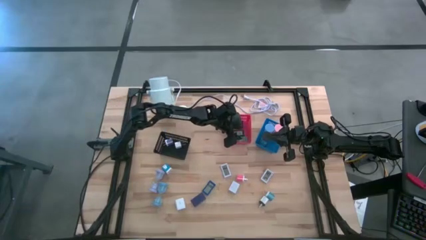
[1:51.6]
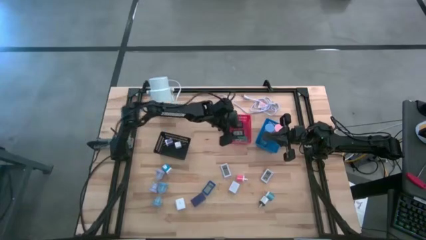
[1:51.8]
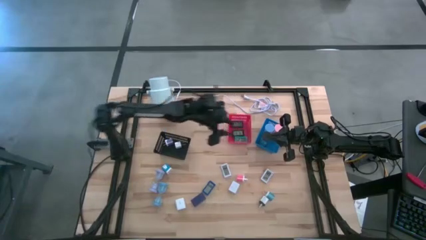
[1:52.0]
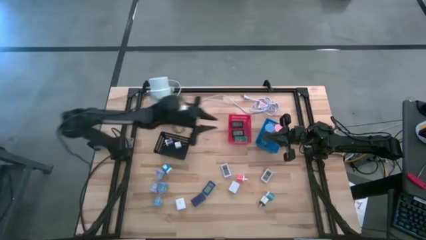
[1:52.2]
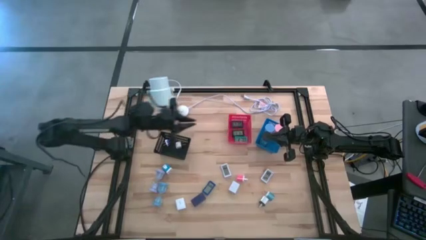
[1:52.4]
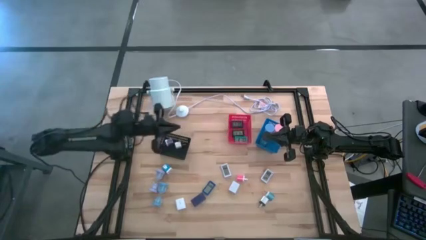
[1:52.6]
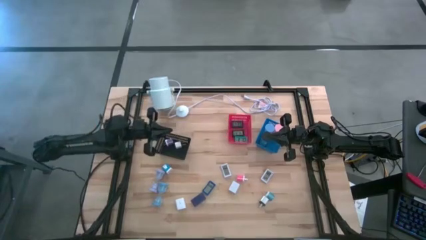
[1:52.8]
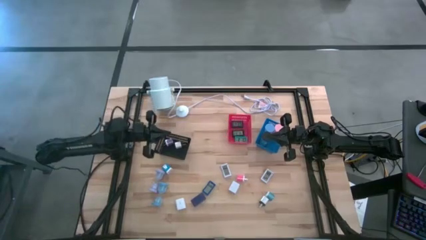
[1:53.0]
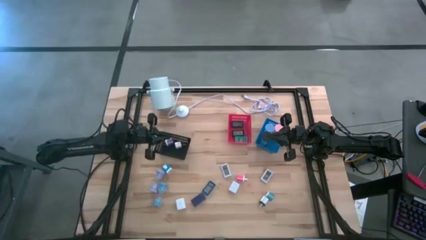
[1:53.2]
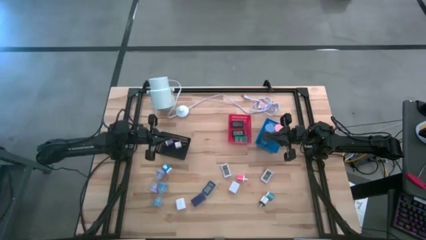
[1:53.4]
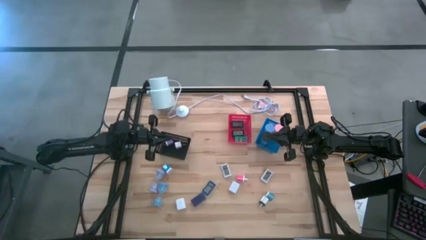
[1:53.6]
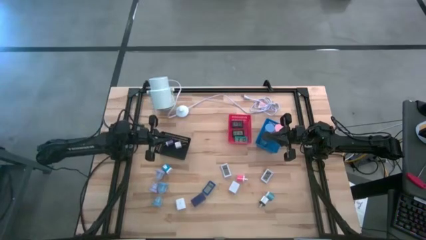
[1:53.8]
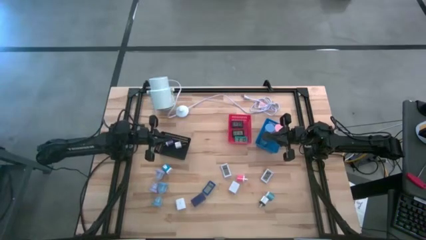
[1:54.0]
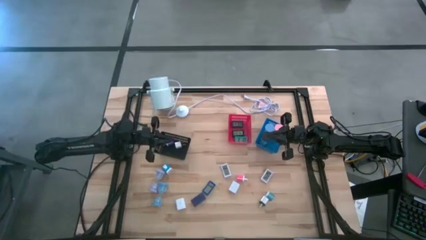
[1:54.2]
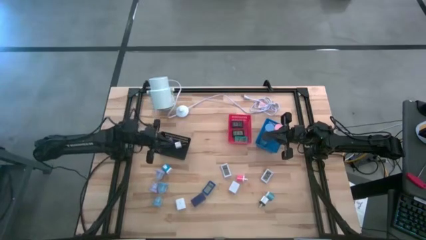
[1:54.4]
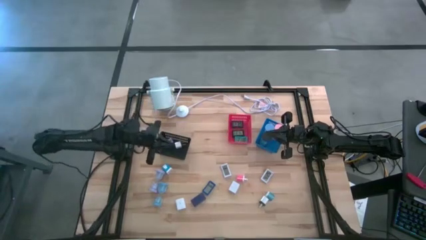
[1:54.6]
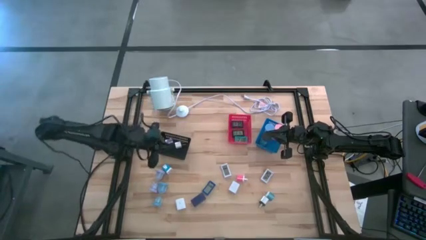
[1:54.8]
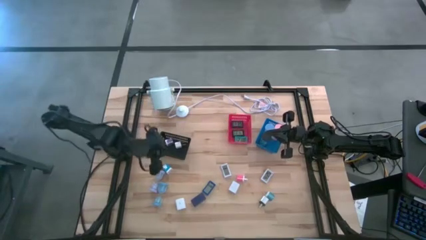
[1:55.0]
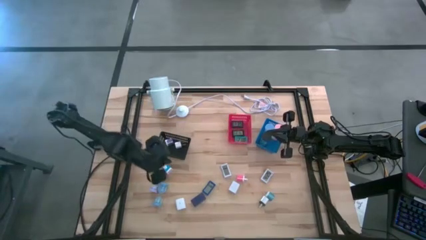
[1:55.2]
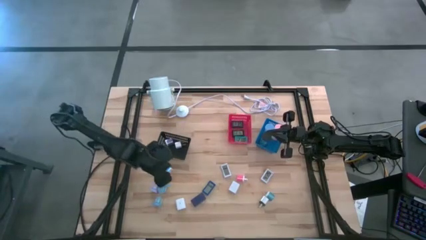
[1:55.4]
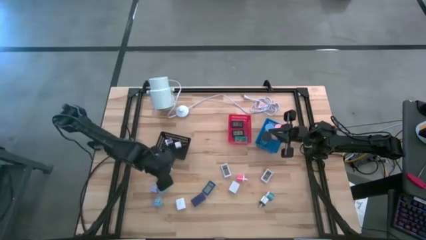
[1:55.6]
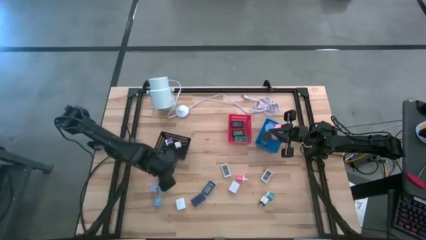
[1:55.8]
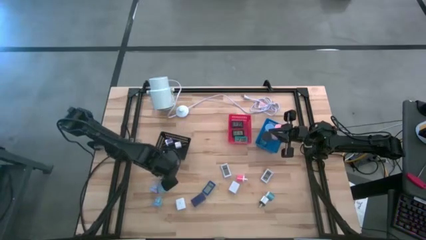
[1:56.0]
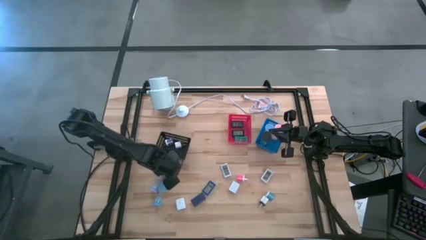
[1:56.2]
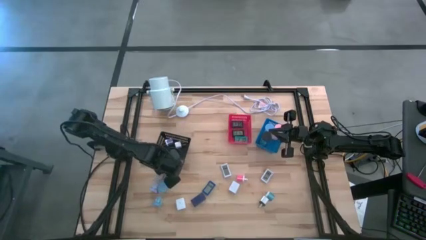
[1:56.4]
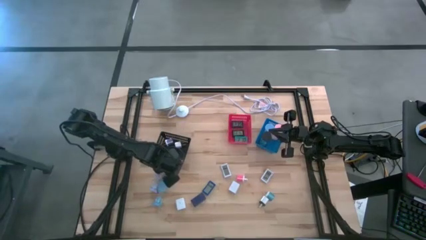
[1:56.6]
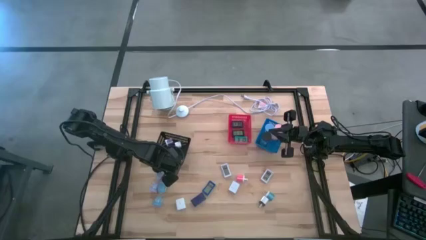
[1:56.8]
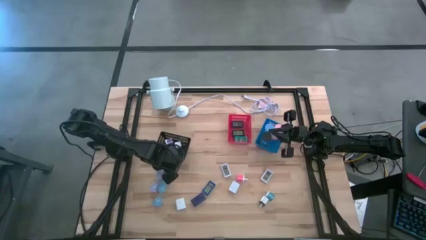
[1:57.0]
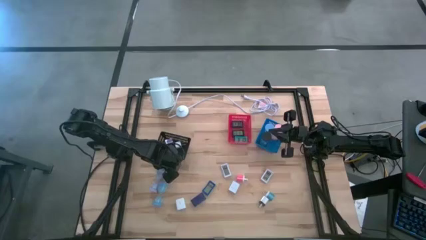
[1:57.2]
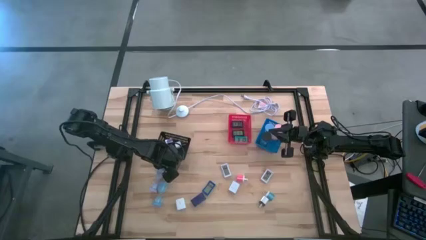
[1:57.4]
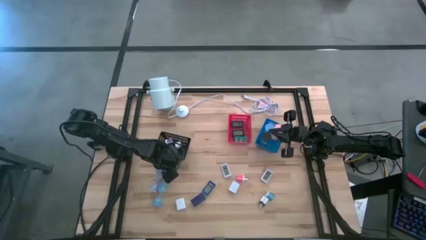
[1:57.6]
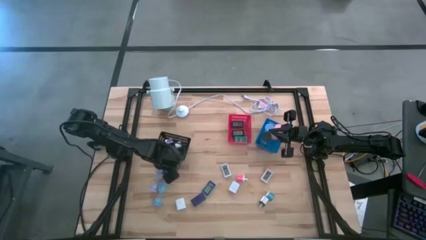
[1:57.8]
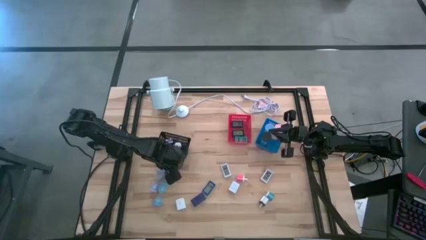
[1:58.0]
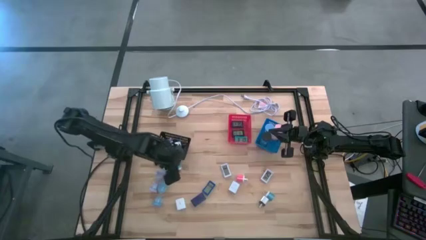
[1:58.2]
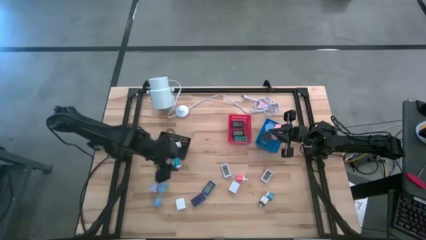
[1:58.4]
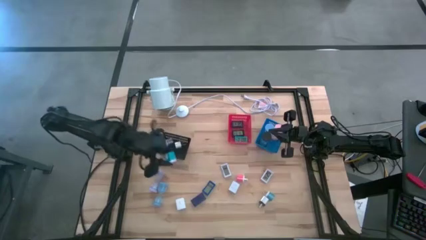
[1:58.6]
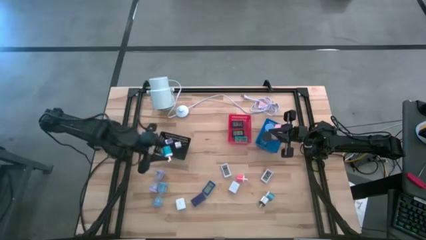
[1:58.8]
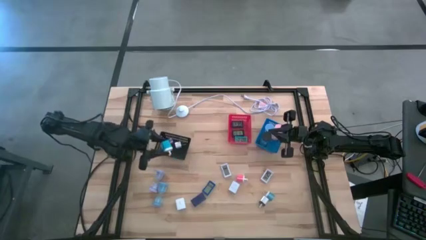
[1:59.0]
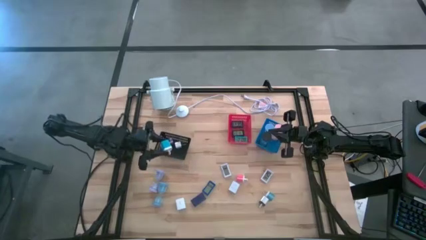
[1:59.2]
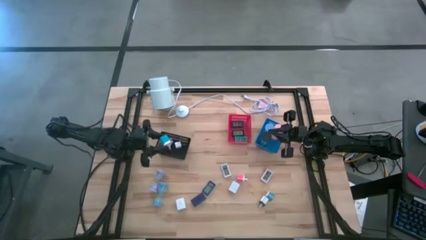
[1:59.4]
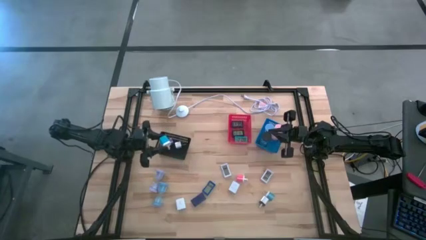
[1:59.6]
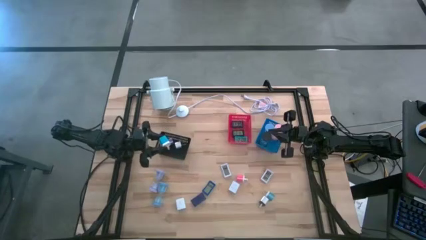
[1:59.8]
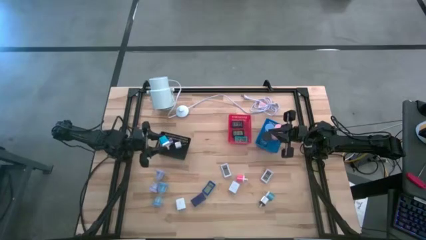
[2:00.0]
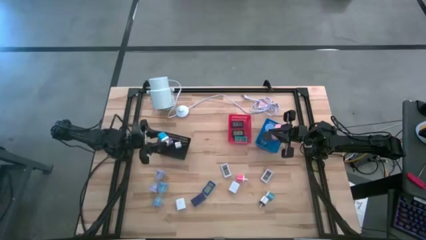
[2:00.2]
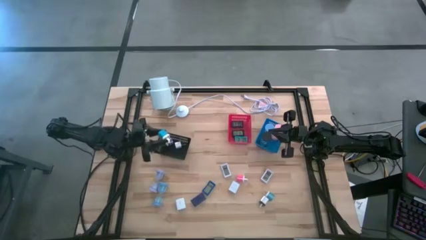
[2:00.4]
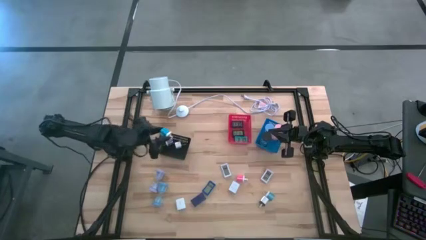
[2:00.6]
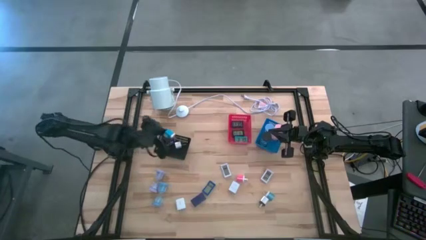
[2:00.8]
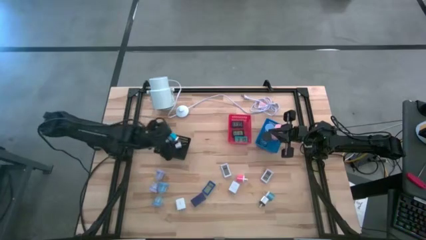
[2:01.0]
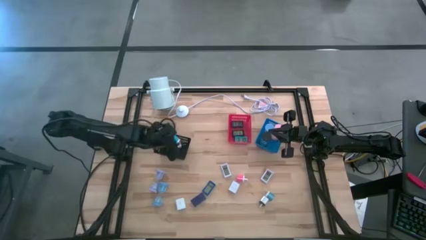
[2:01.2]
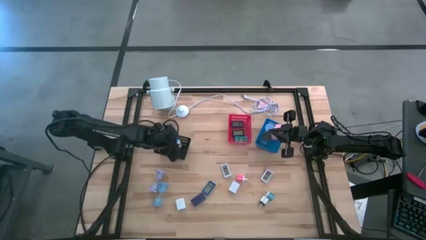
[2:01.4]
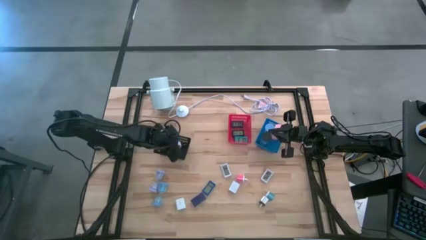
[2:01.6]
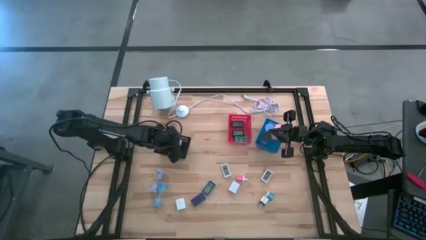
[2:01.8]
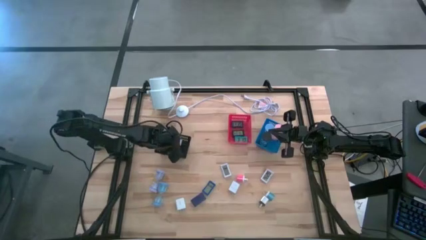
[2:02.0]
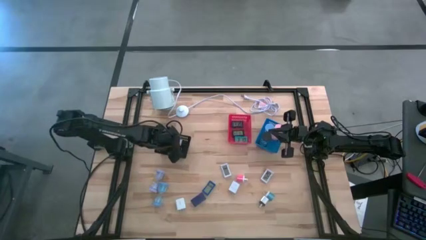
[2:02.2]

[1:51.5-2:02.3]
Task: Pick & Place Office items
Put the left light blue charger adaptor into the black bin

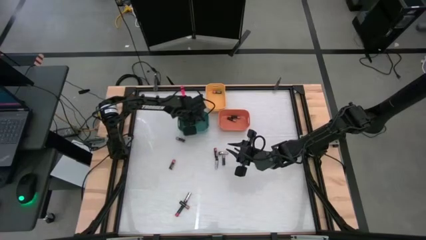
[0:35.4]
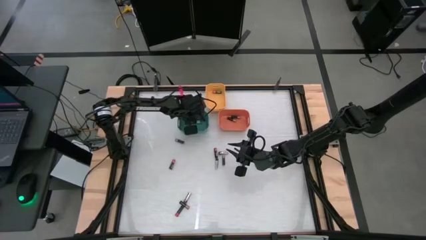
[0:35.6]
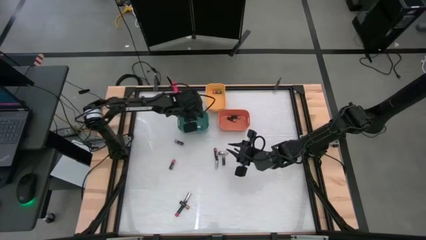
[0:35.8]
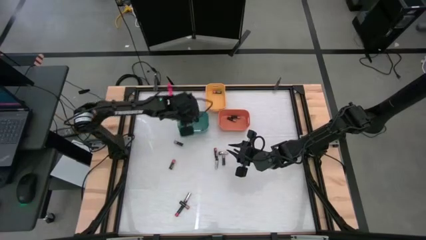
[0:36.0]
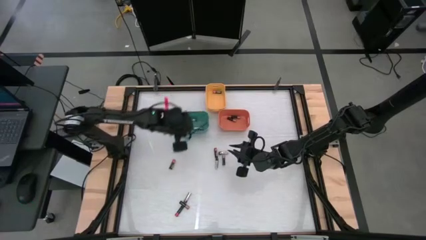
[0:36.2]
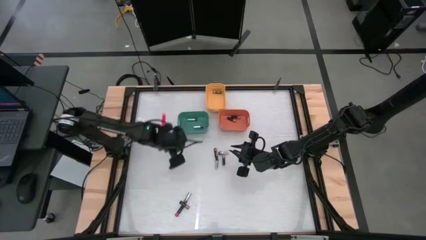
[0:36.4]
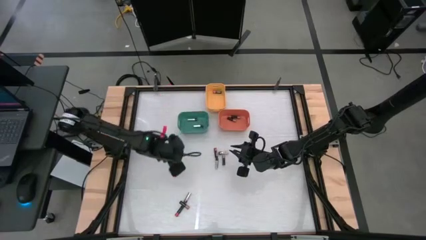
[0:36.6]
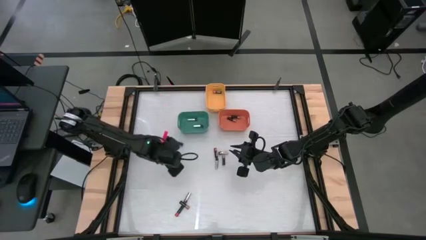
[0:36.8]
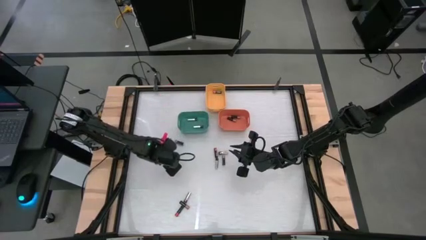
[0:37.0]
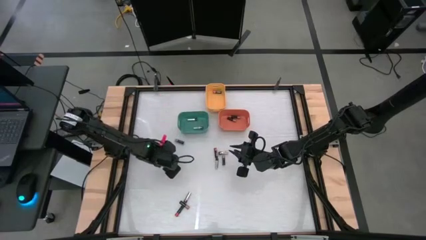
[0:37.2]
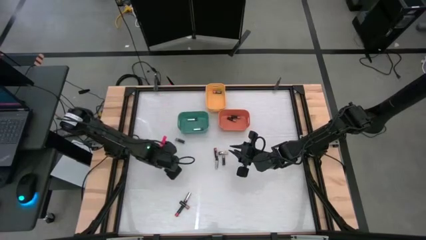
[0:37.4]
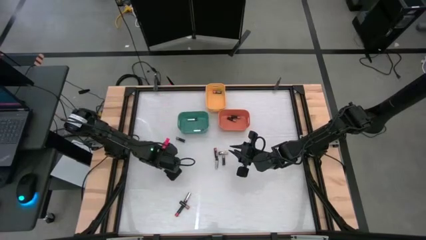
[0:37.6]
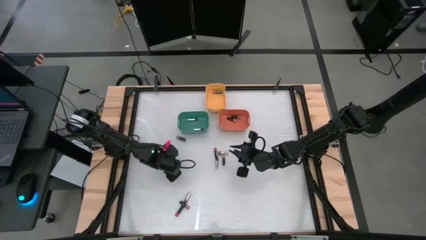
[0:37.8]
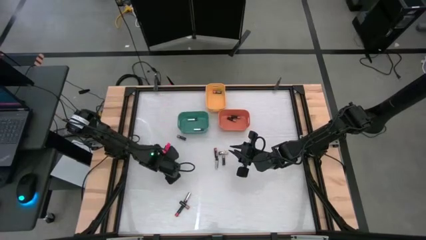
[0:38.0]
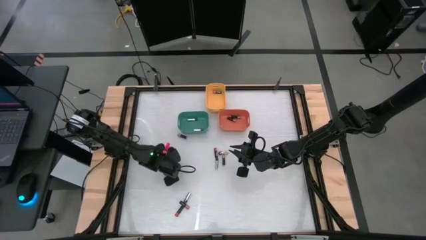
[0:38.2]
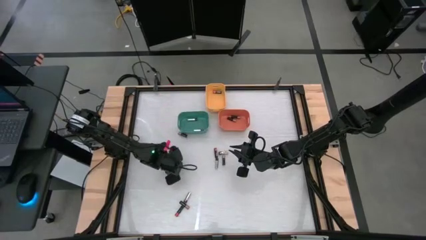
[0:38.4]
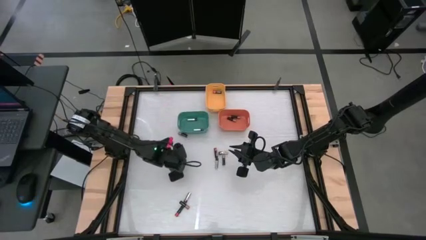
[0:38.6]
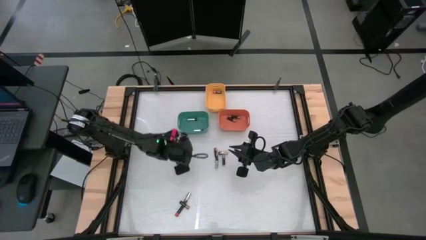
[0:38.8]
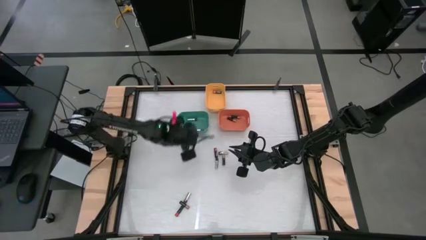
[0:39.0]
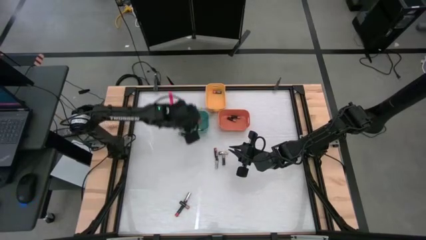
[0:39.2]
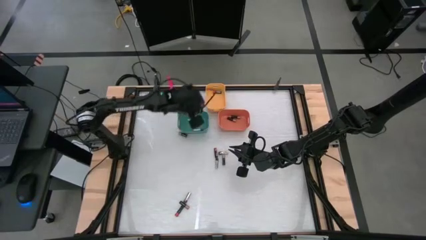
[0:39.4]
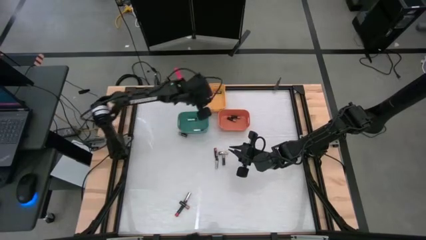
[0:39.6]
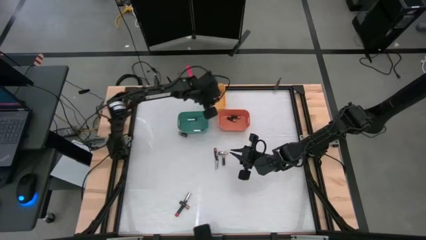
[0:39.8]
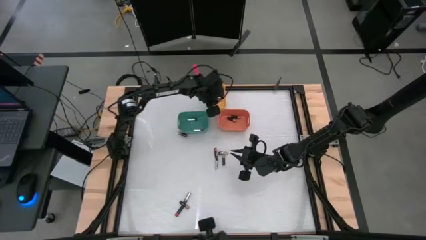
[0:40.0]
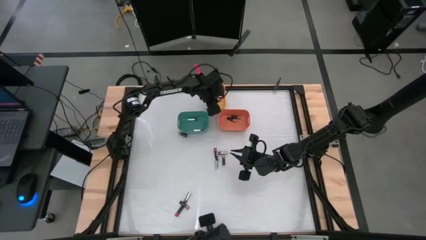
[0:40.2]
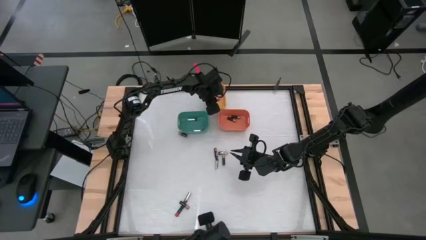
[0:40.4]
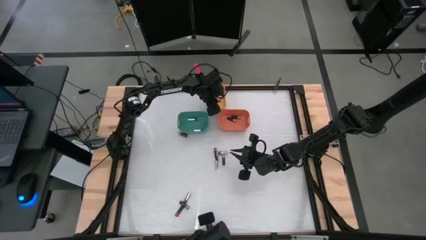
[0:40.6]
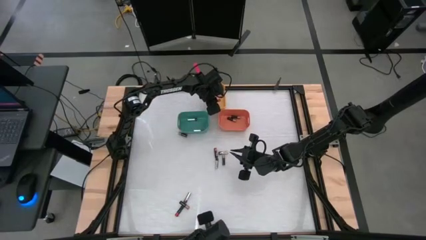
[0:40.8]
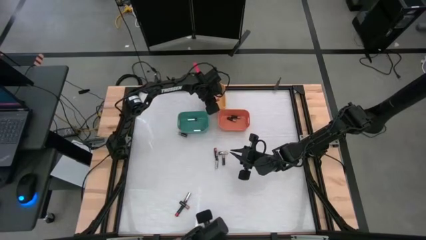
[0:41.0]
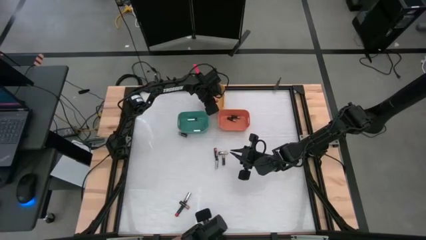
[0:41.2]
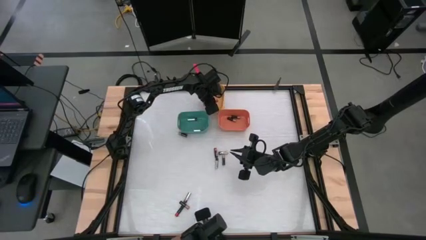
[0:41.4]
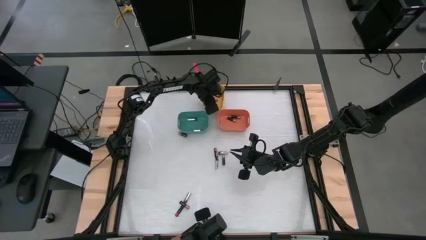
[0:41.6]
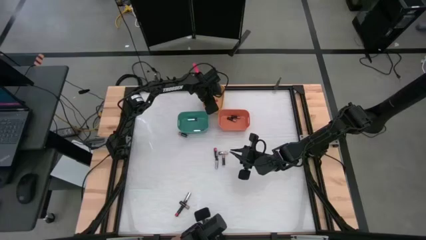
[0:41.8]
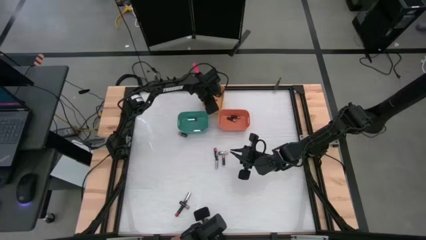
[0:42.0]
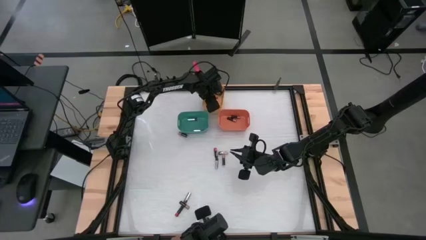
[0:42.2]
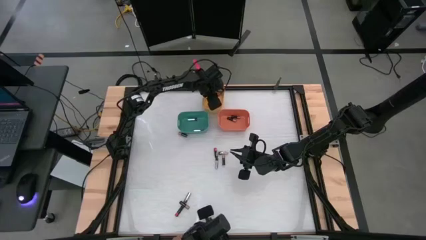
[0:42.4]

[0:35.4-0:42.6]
Task: Sort batteries
Put the red battery into the yellow bin
